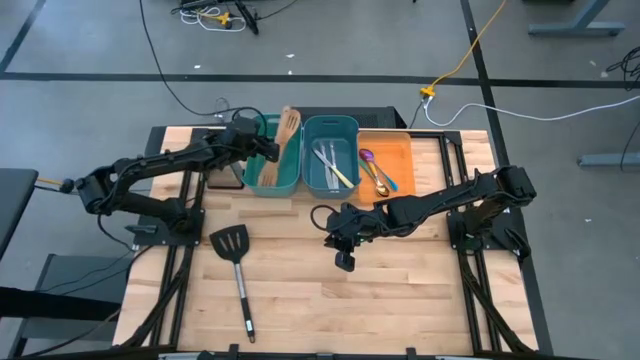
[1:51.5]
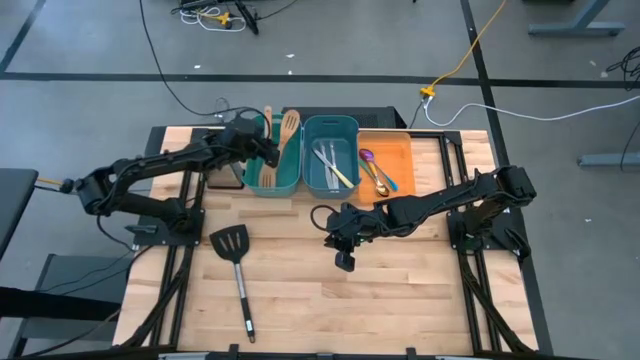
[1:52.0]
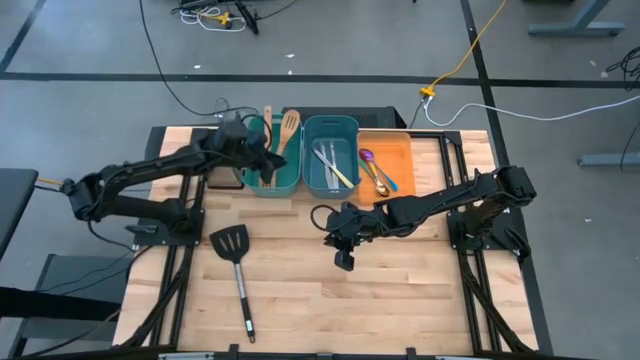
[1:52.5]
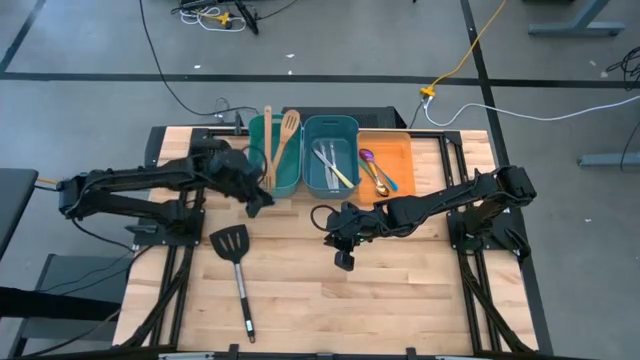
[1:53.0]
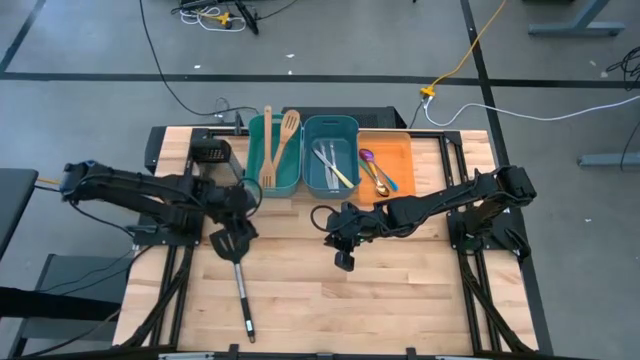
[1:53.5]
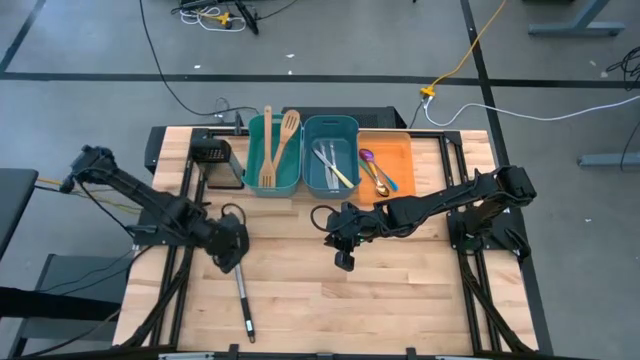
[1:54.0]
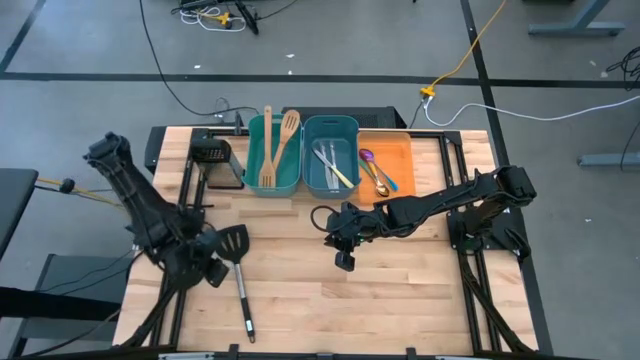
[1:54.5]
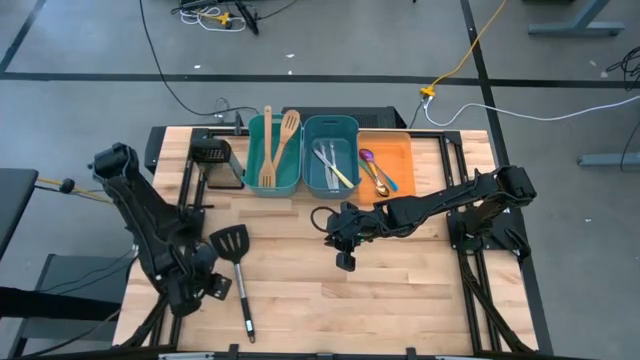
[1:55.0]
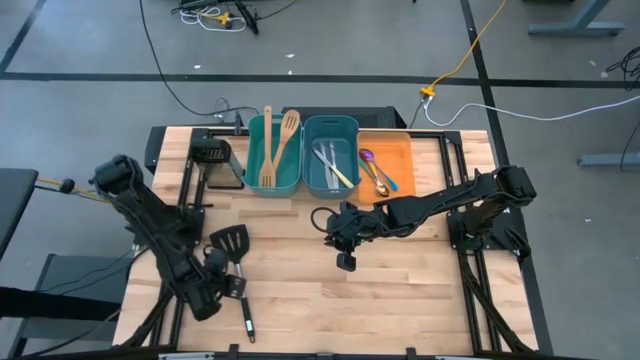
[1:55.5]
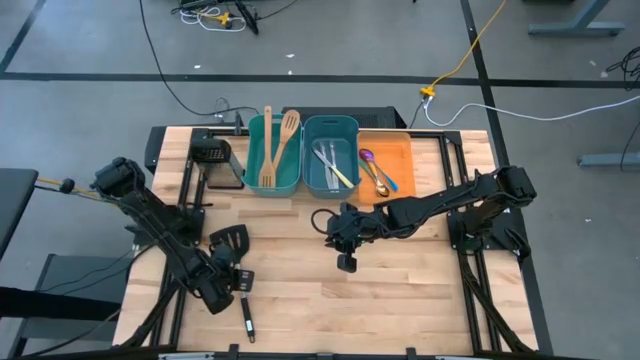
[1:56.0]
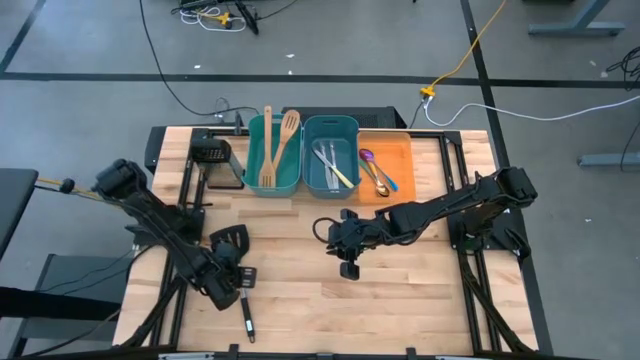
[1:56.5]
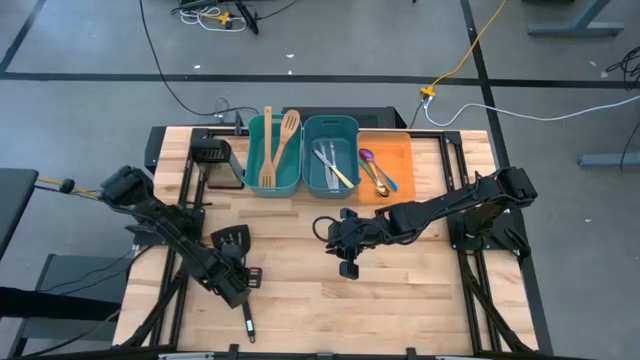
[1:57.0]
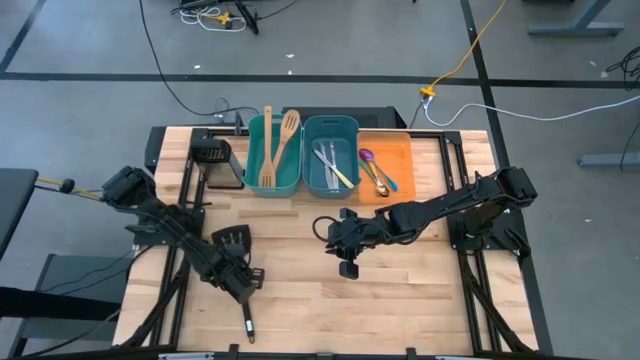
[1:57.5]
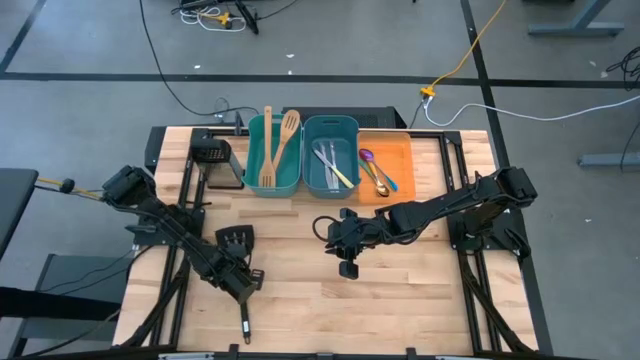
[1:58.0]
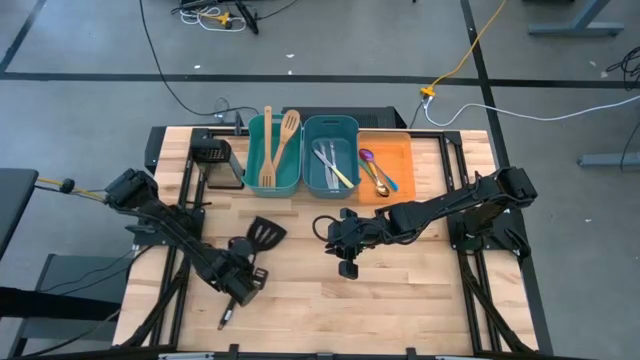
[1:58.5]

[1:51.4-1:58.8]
Task: Pick & Place Kitchen Items
Put the black spatula into the green bin

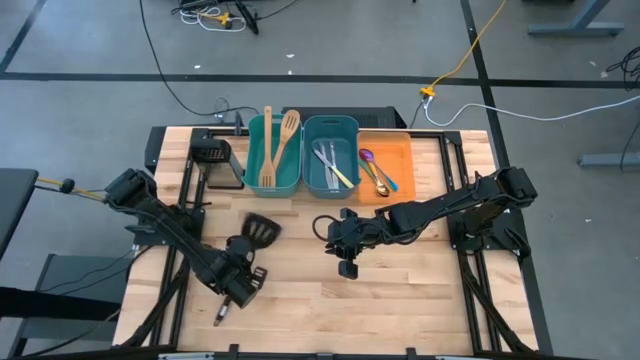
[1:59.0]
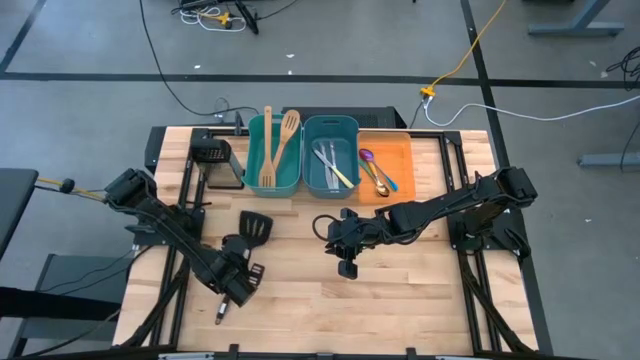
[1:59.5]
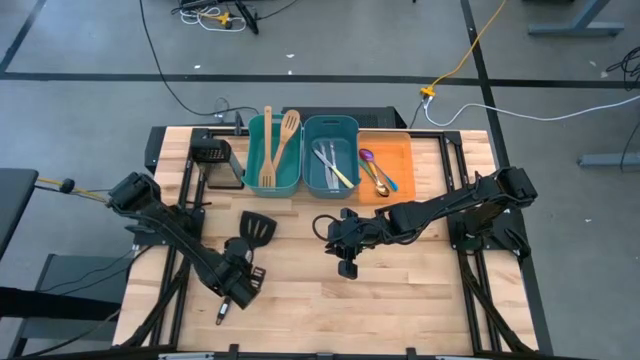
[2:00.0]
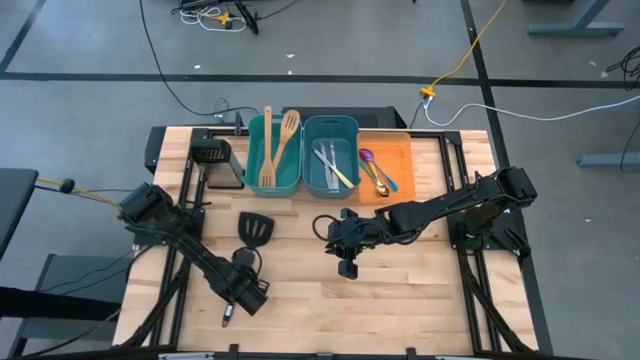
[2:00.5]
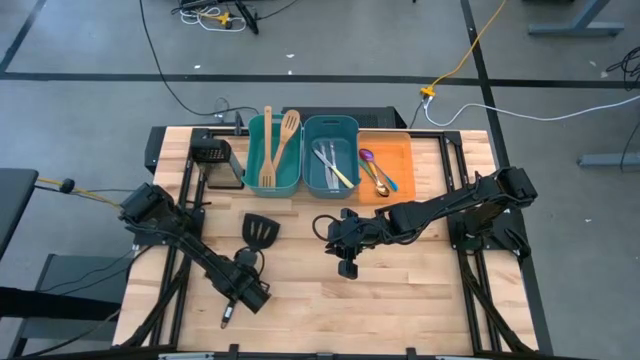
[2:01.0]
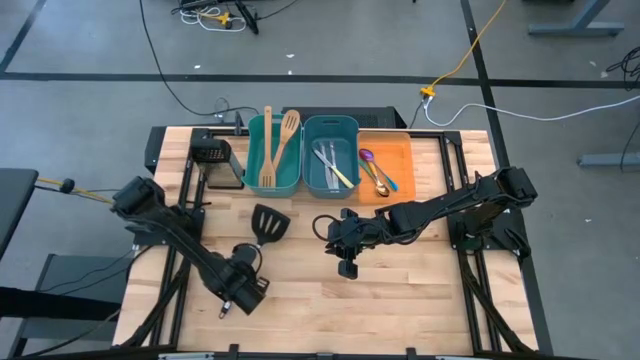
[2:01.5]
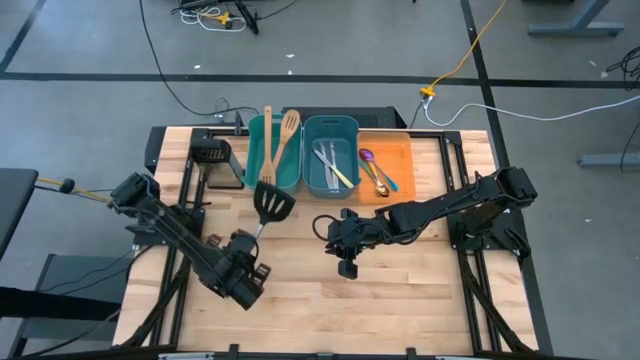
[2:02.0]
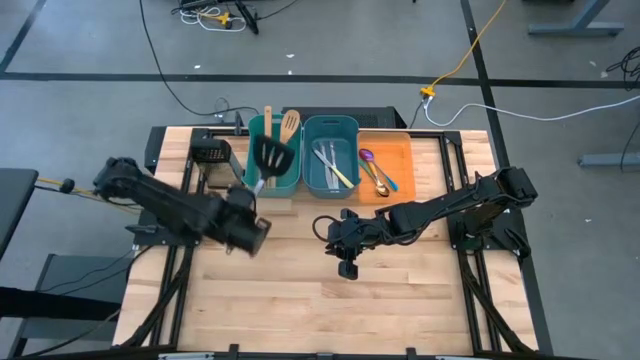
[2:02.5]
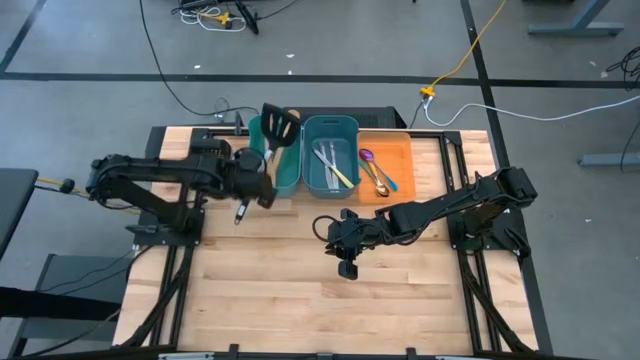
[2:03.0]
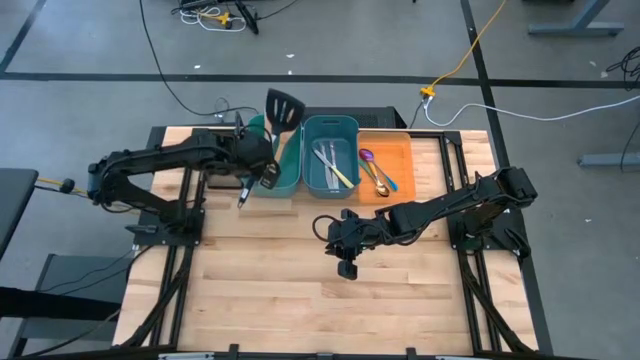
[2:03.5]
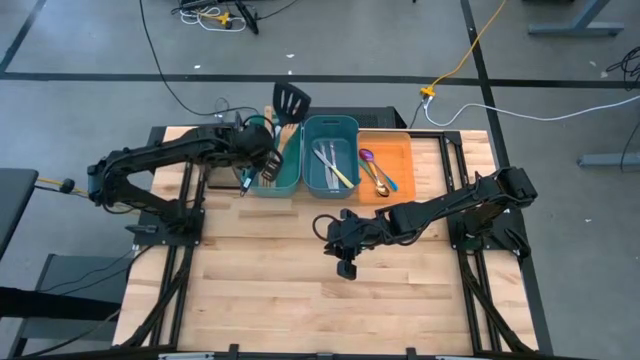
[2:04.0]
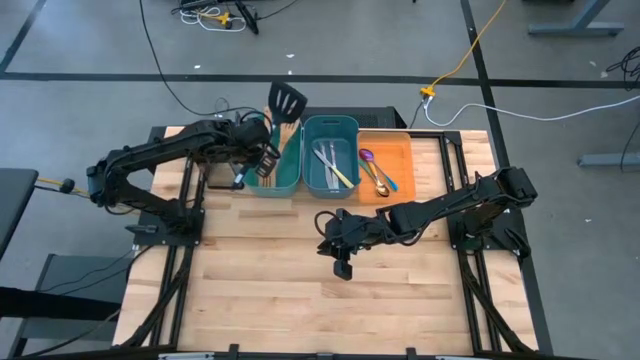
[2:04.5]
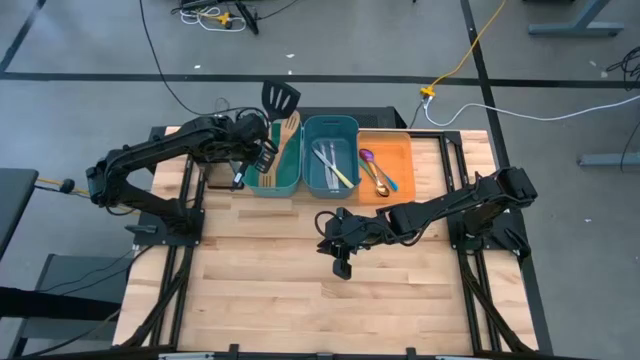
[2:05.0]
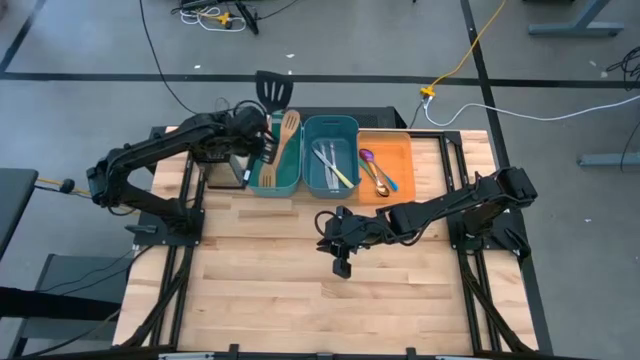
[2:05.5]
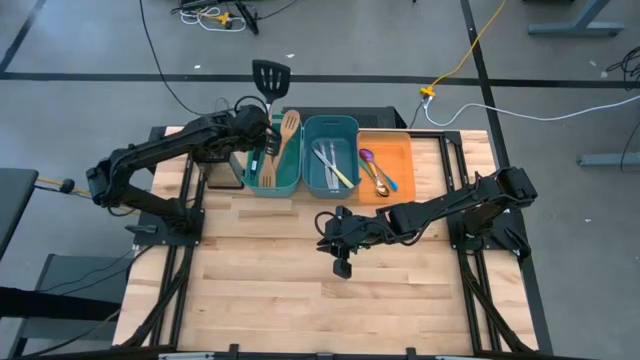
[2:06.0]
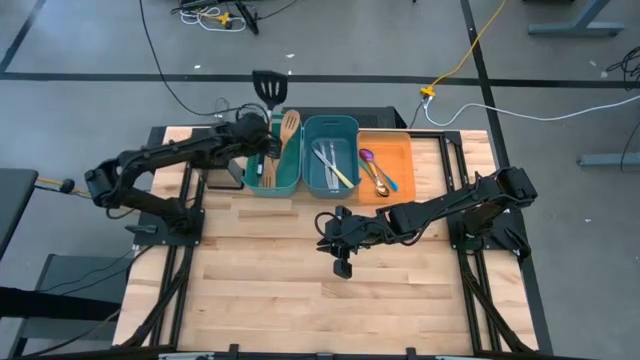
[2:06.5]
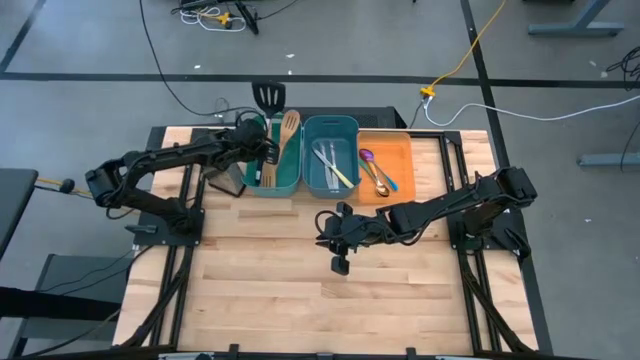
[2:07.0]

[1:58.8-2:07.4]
Put the black spatula into the green bin

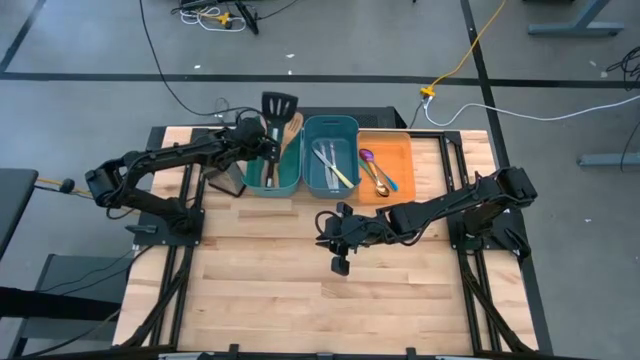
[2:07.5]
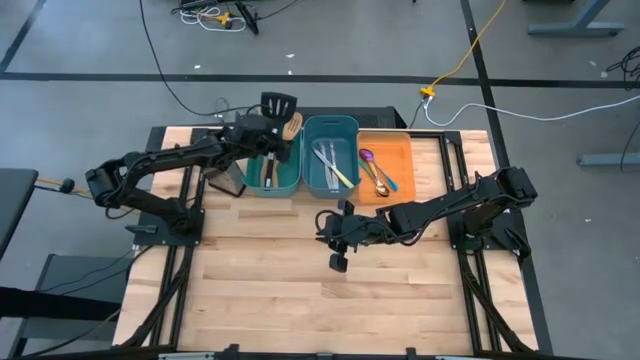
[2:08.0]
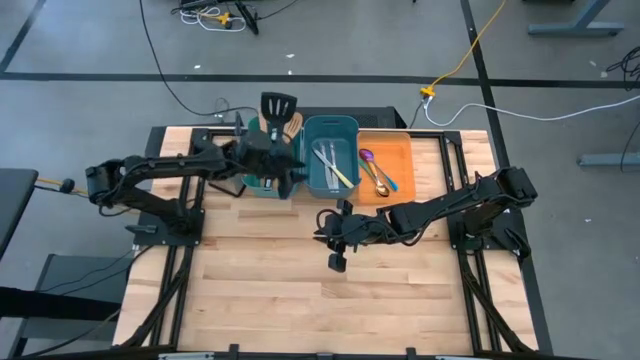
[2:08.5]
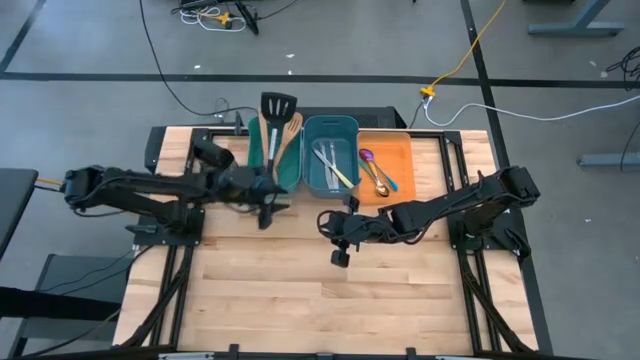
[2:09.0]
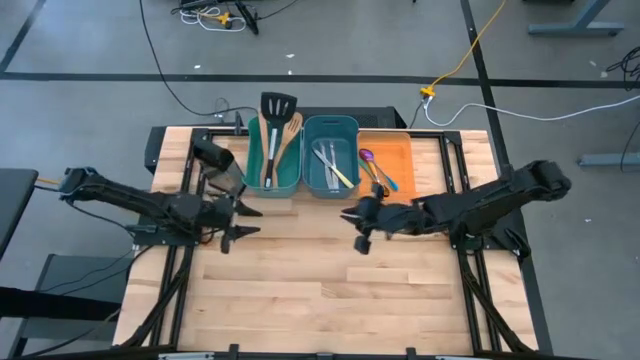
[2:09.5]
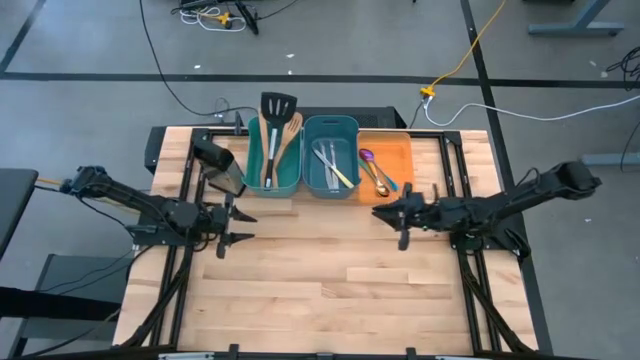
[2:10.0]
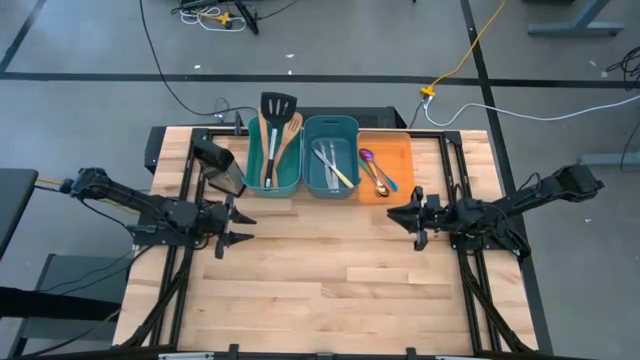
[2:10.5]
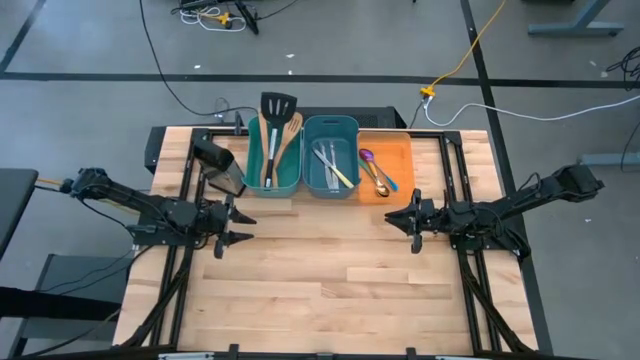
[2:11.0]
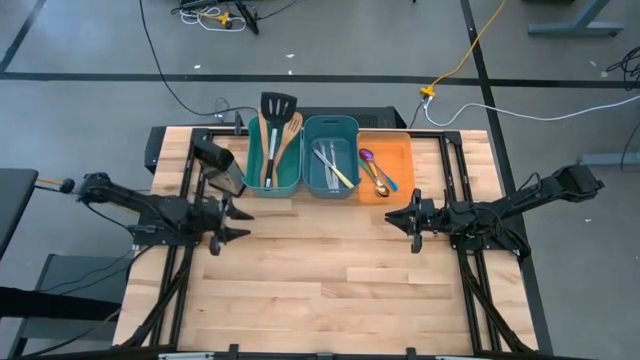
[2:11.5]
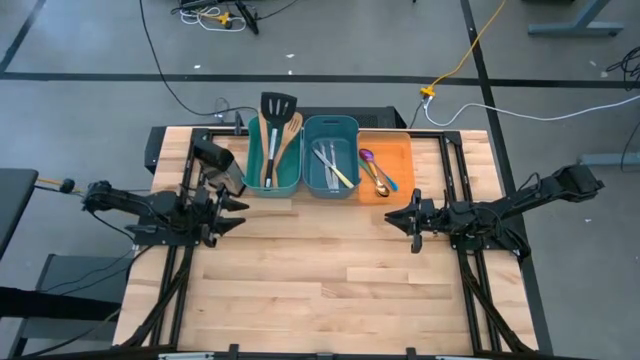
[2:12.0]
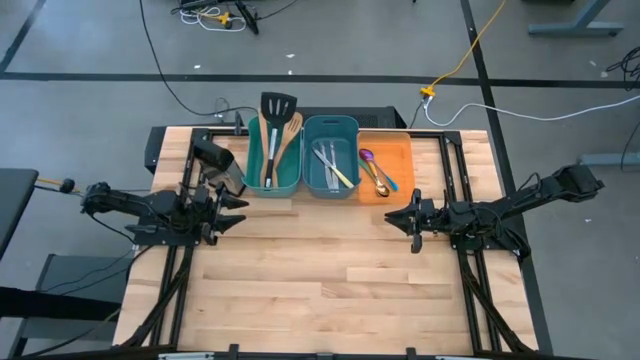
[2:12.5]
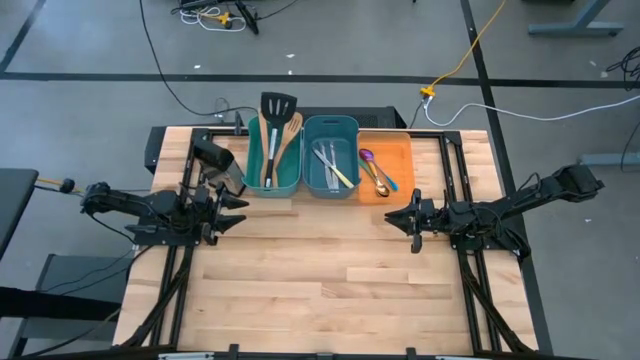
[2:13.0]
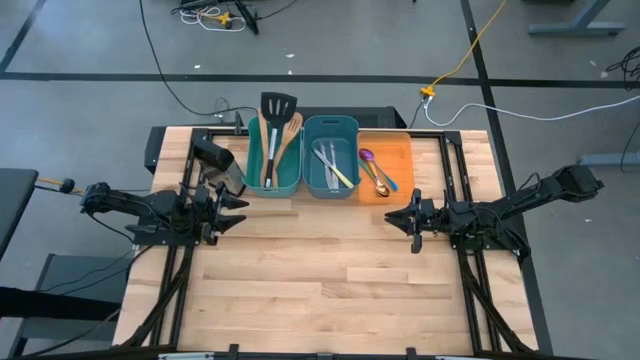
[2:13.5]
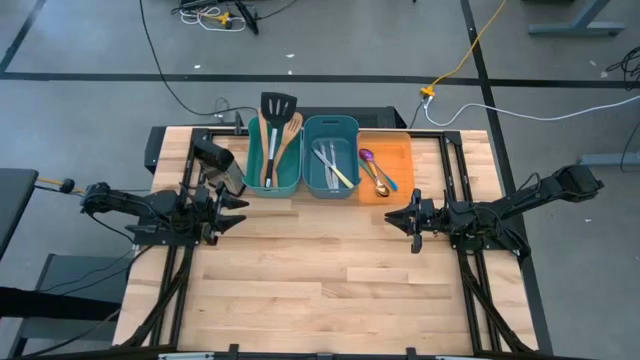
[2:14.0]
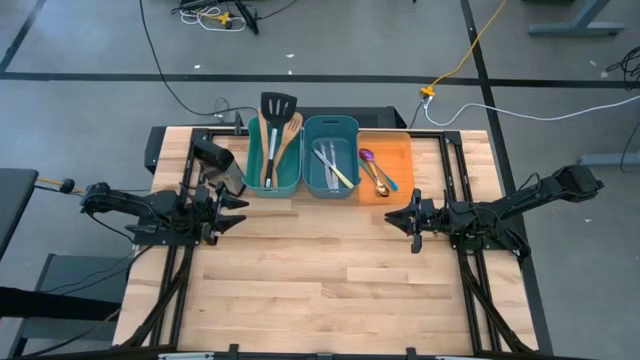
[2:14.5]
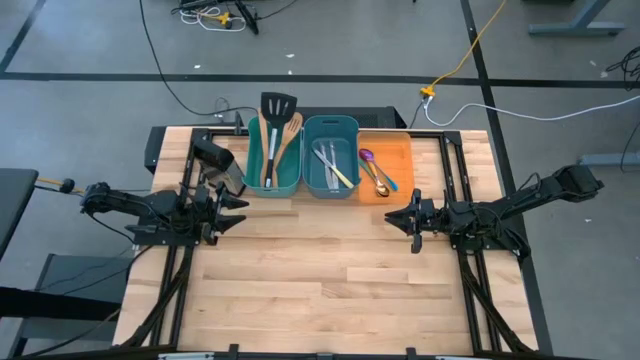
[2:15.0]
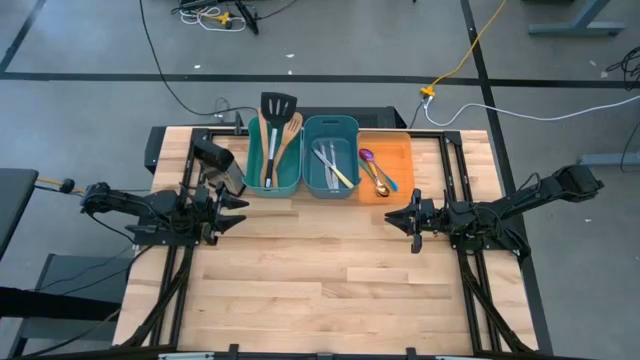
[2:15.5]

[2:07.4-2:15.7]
Return to Home Position
